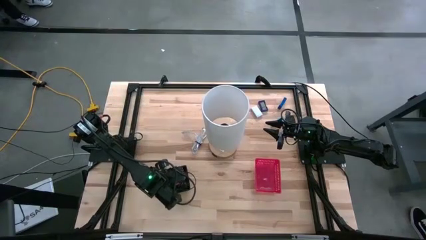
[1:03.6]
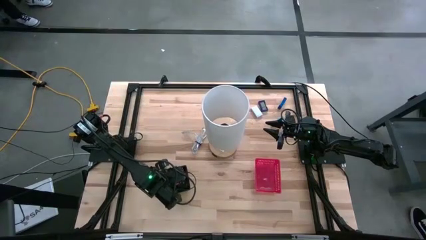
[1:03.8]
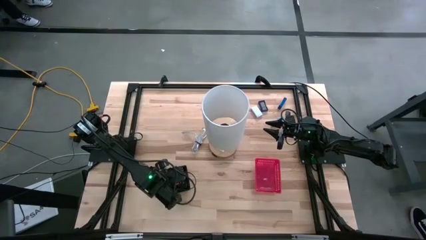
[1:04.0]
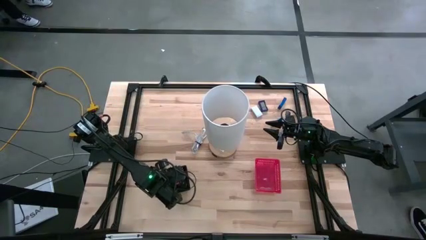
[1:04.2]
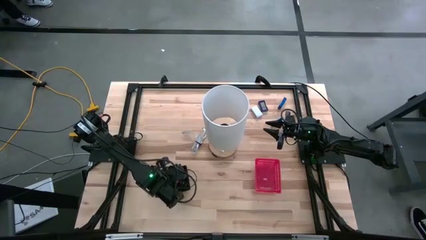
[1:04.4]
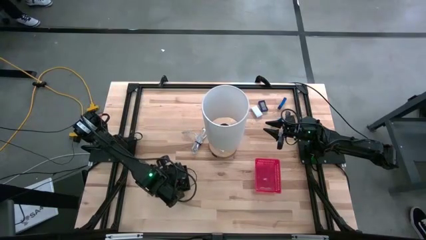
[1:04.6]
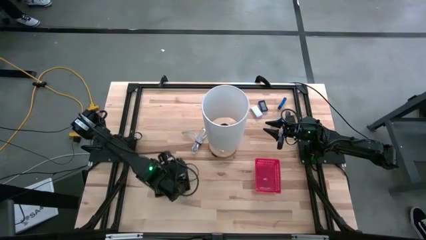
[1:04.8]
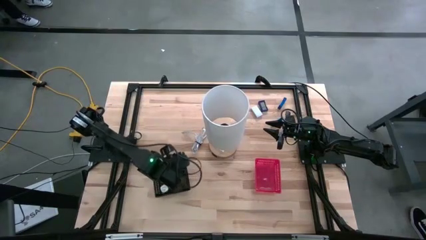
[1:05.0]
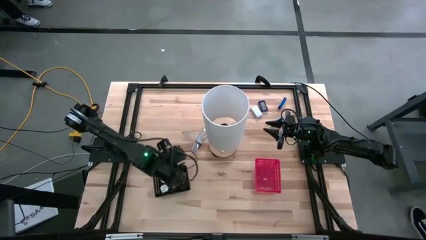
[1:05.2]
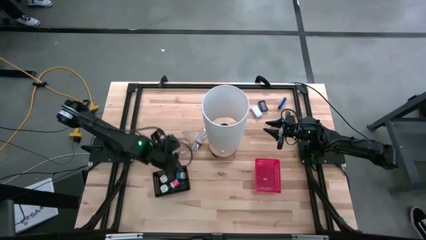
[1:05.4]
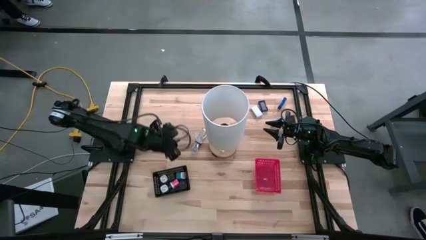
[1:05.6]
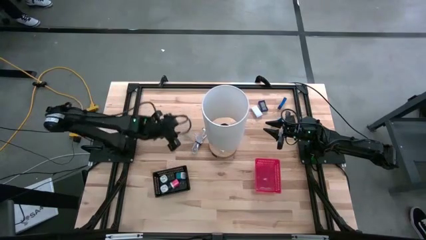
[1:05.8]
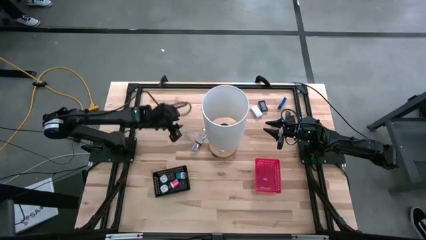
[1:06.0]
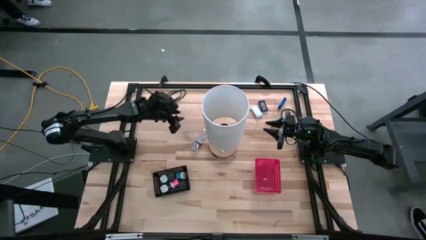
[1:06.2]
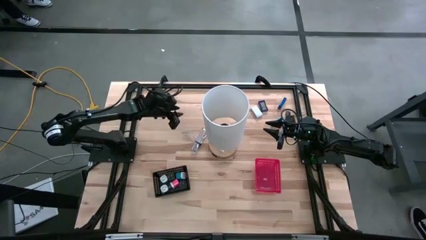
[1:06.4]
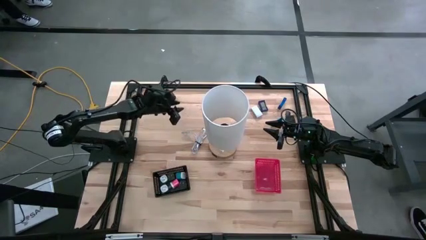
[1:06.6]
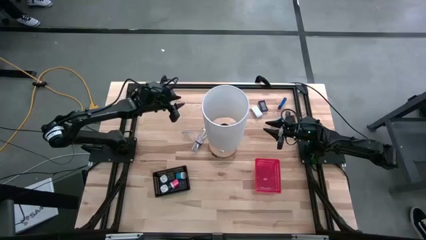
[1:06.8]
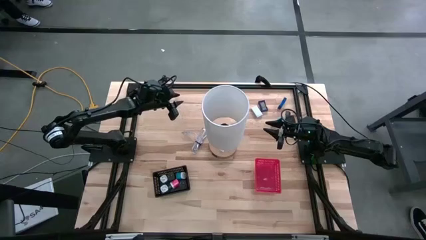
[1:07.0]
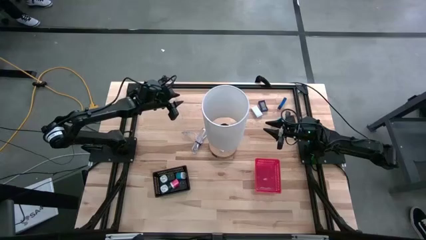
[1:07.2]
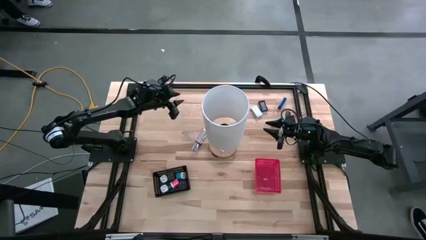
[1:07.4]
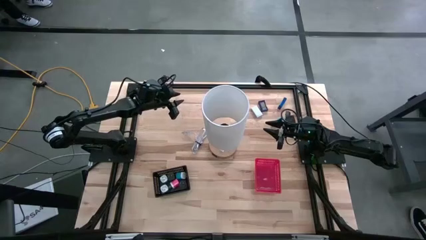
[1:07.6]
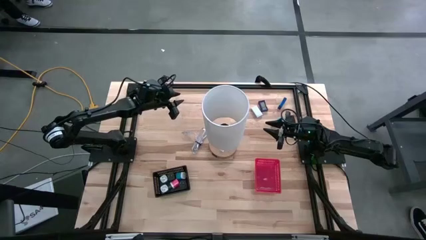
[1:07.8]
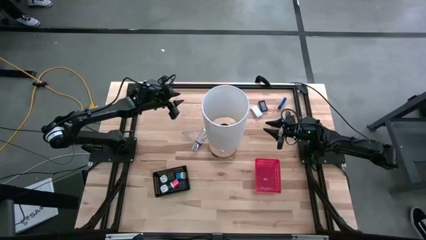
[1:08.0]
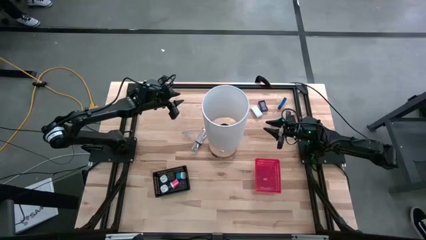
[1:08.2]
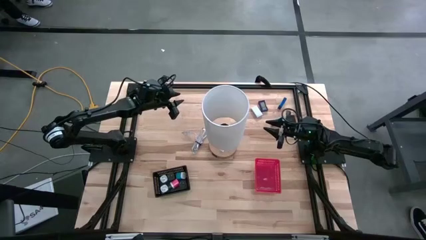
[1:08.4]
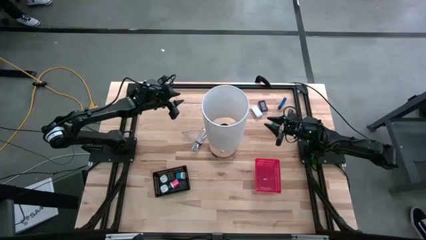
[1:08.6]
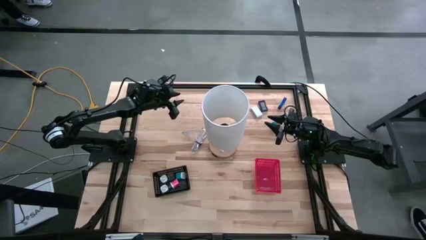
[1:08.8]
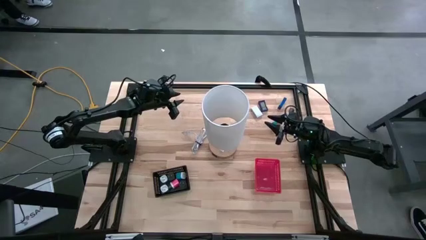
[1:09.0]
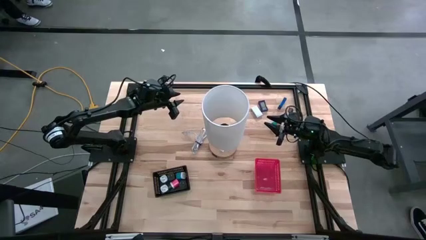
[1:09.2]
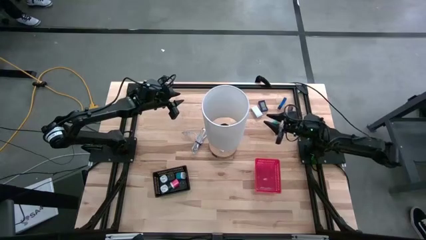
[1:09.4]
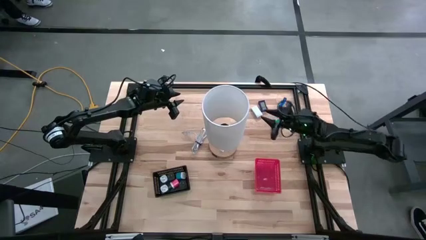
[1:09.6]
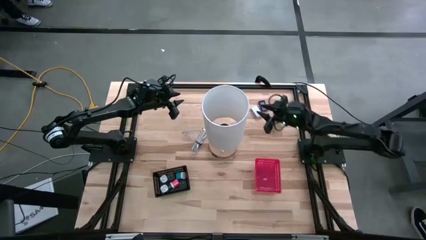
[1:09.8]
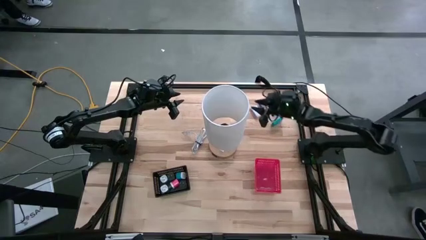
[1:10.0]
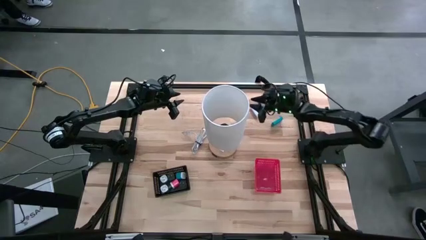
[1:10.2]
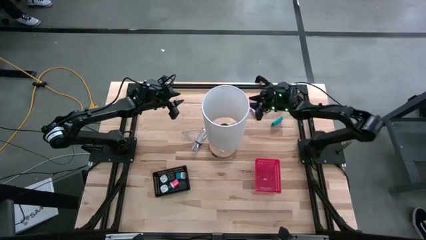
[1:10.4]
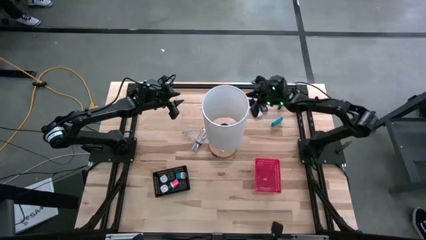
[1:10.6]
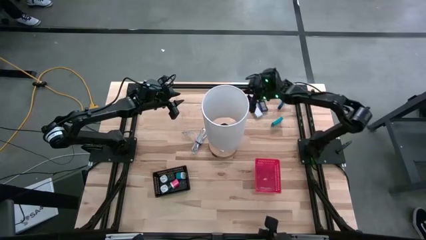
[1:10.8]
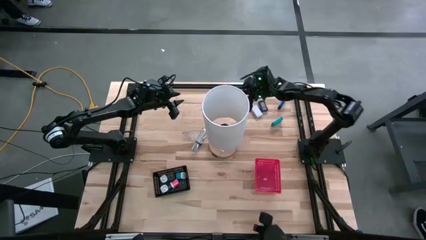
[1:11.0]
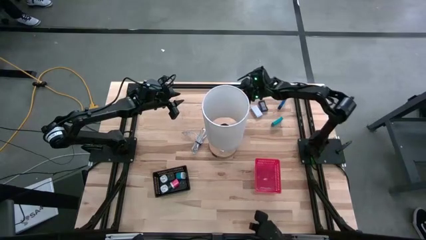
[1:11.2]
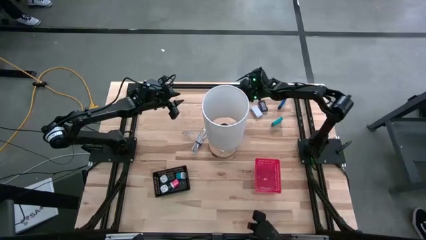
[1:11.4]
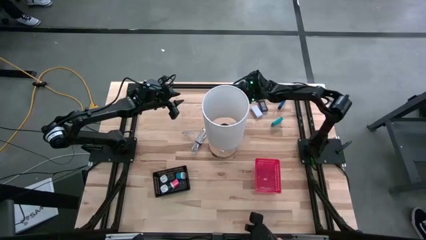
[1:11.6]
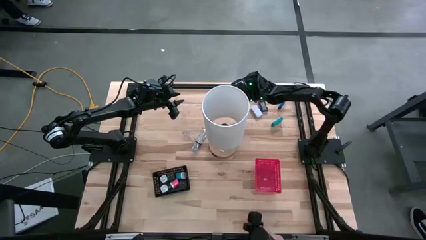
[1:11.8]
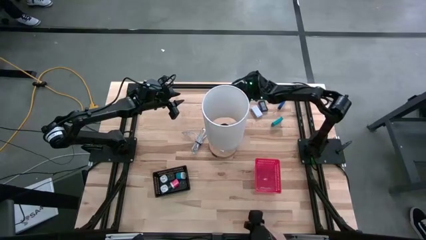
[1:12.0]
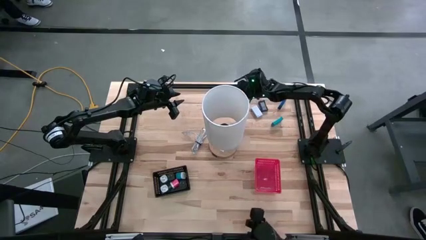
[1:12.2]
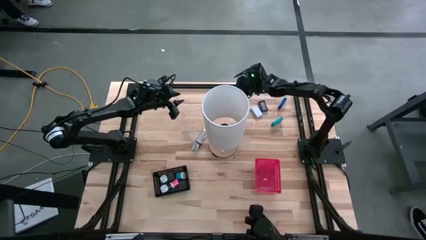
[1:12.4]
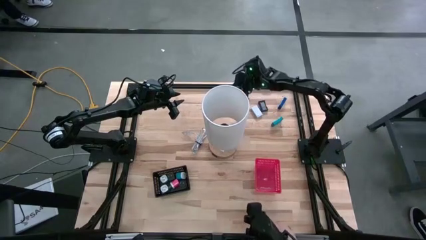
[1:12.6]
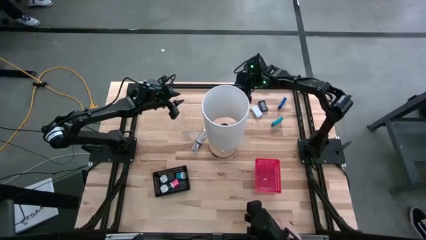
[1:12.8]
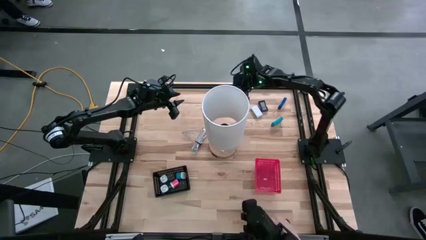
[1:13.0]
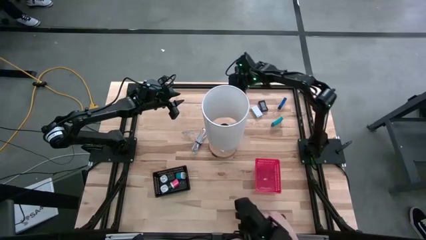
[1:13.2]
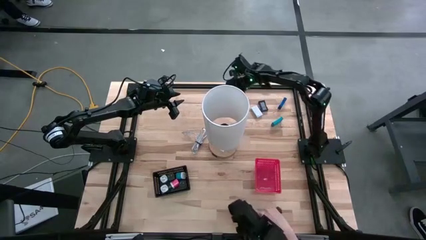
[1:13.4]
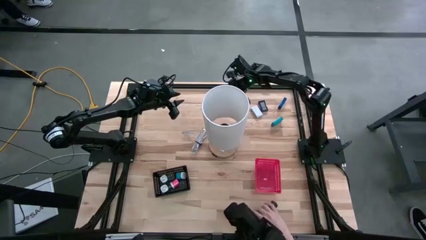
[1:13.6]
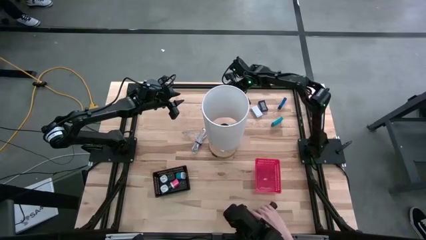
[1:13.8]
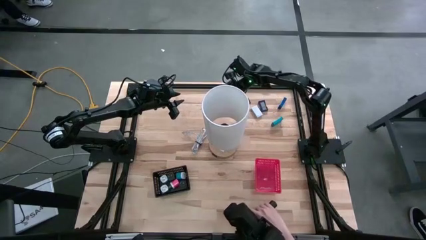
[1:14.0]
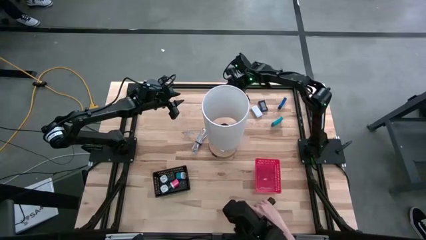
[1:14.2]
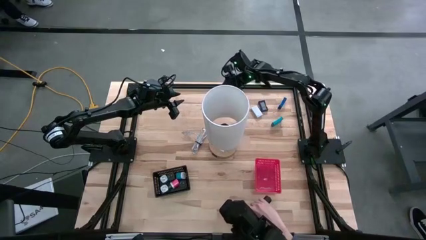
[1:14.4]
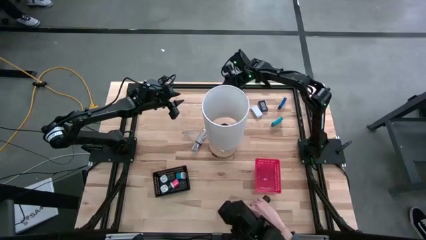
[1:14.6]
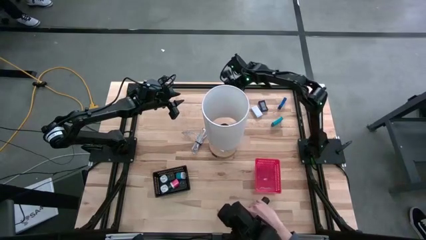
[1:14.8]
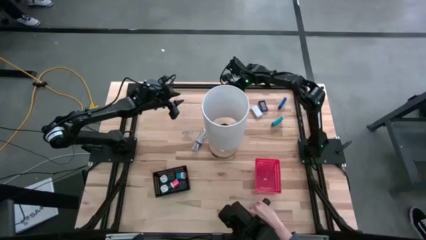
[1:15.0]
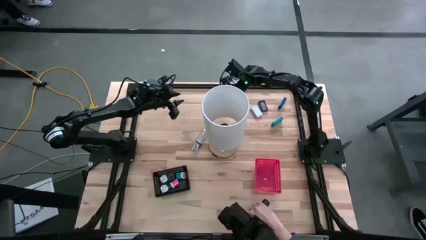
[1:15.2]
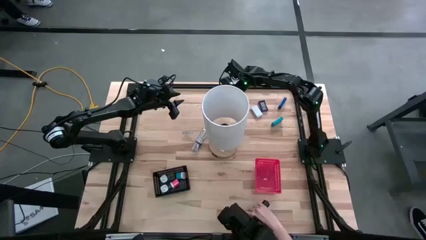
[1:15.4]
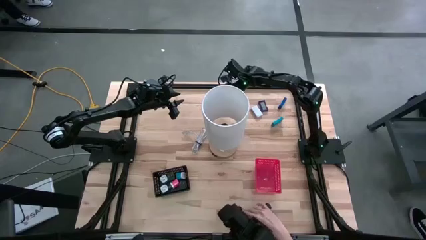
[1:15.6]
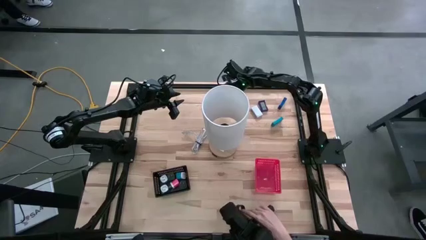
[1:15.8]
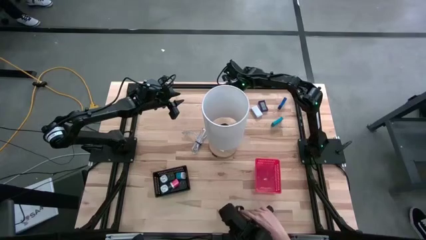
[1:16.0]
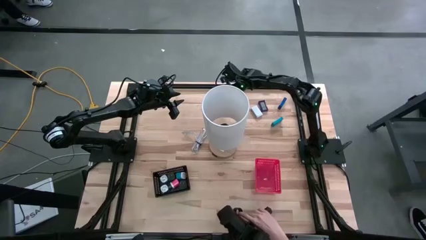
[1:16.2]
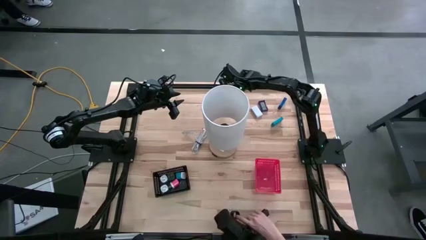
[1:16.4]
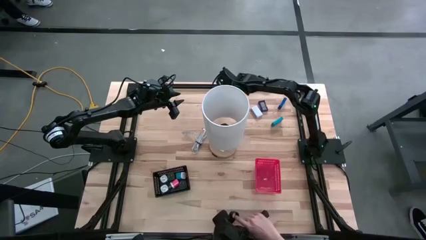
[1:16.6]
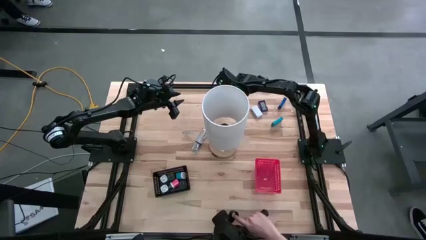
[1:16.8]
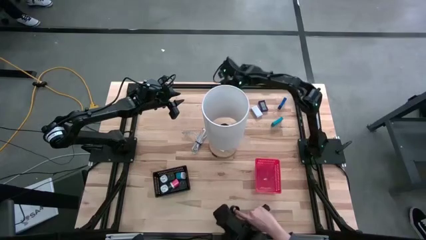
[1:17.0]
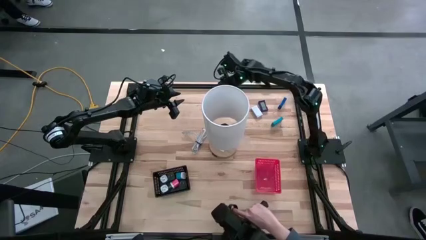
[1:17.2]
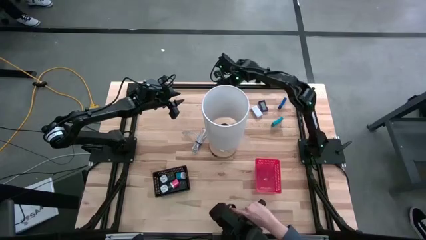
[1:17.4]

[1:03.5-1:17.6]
Task: Pick & Place Office items
Put the black charger adapter into the black bin
